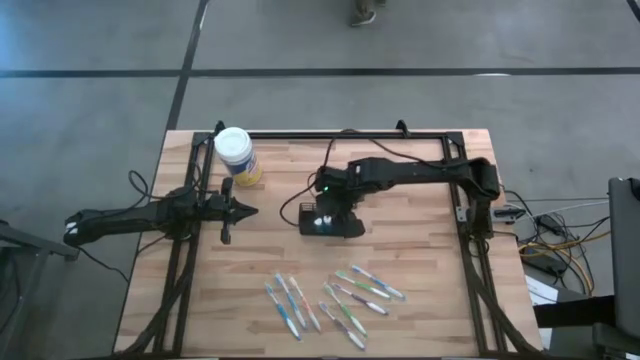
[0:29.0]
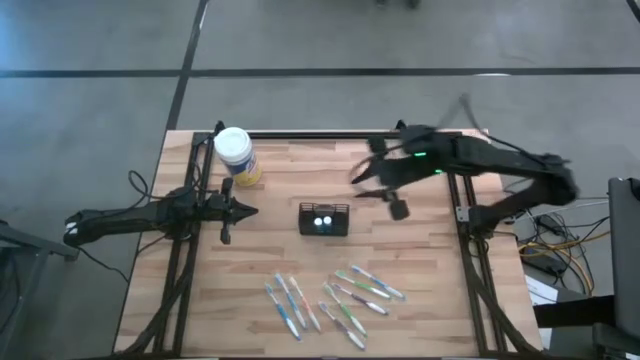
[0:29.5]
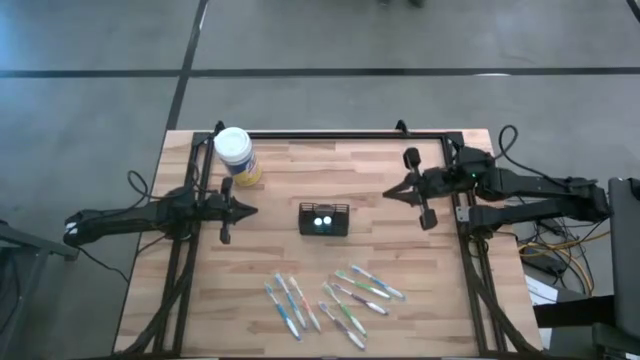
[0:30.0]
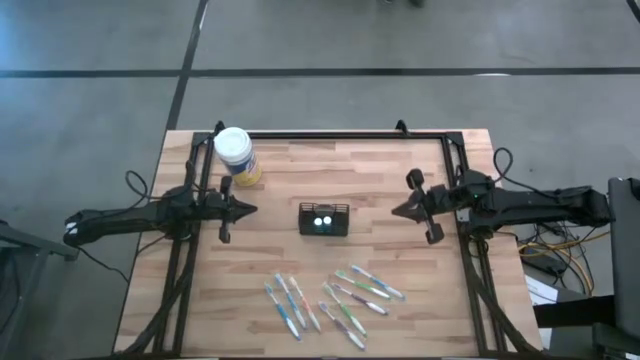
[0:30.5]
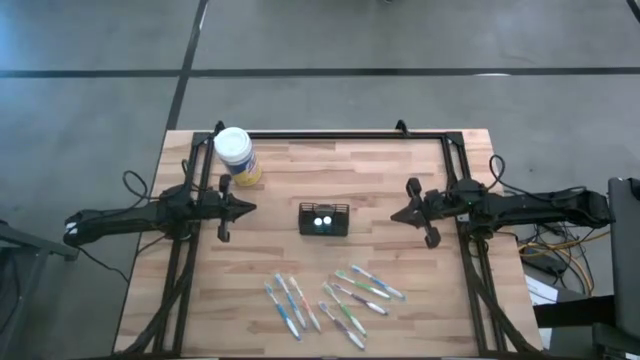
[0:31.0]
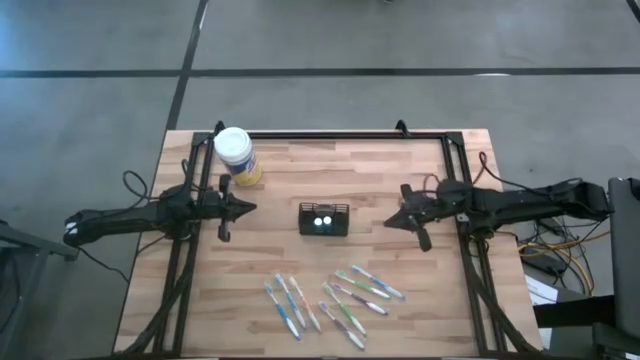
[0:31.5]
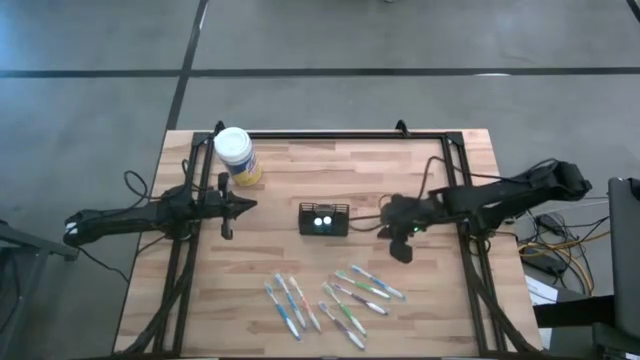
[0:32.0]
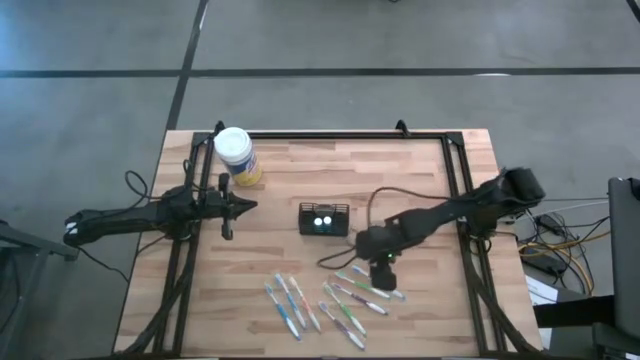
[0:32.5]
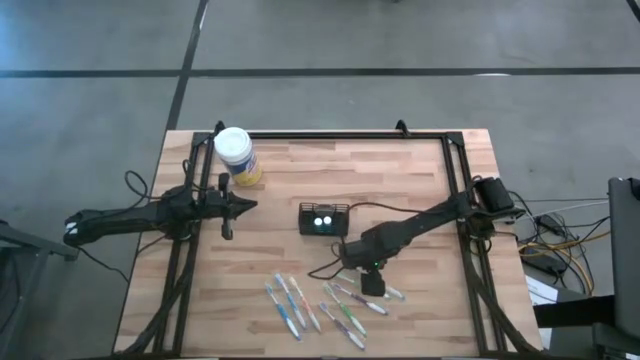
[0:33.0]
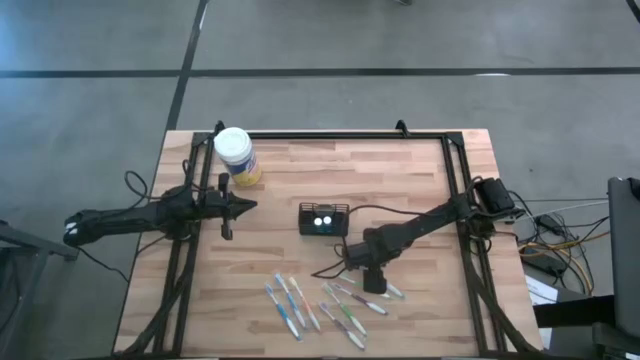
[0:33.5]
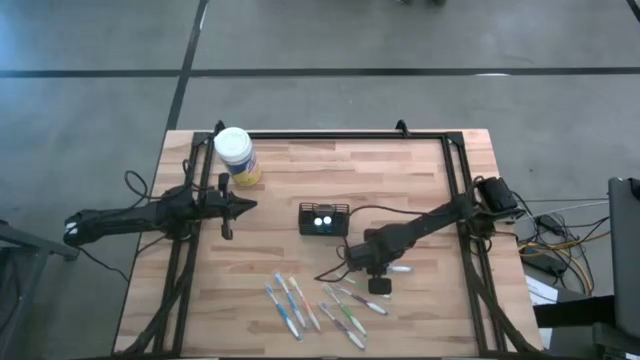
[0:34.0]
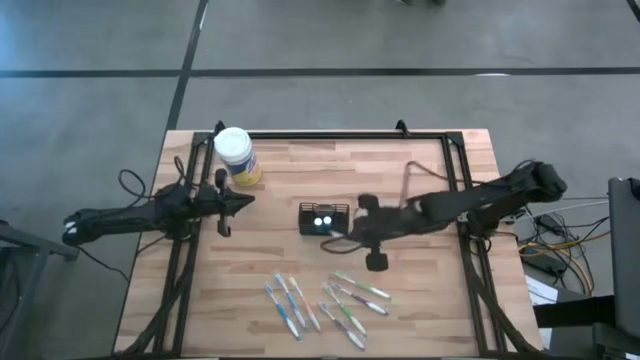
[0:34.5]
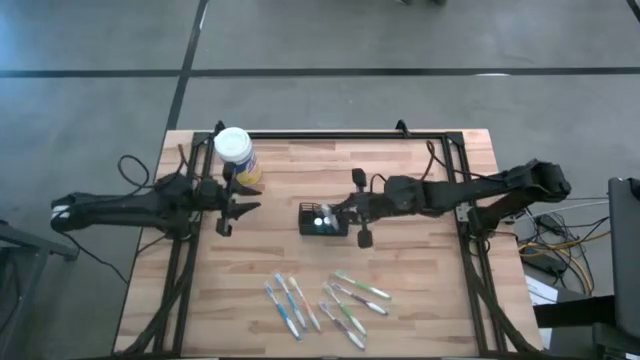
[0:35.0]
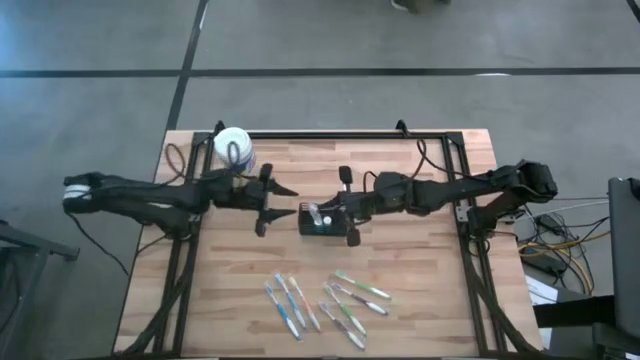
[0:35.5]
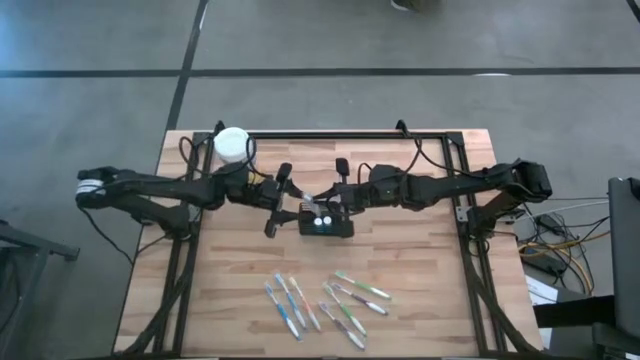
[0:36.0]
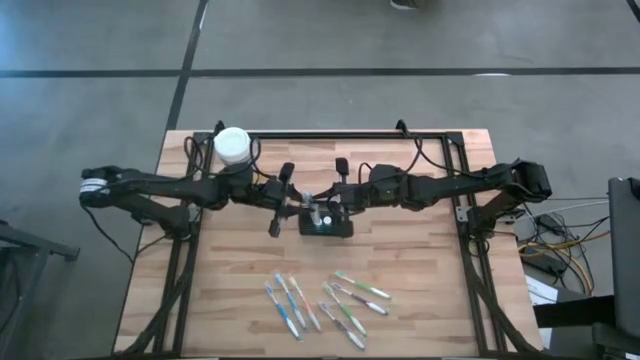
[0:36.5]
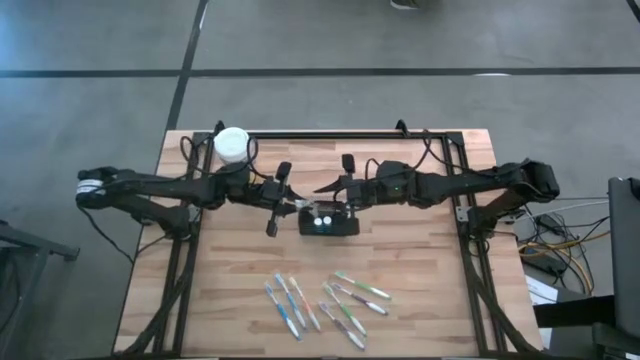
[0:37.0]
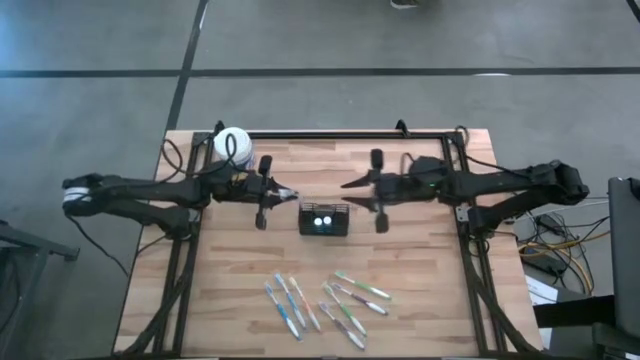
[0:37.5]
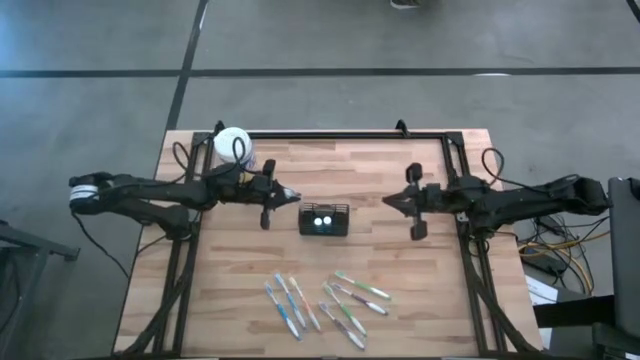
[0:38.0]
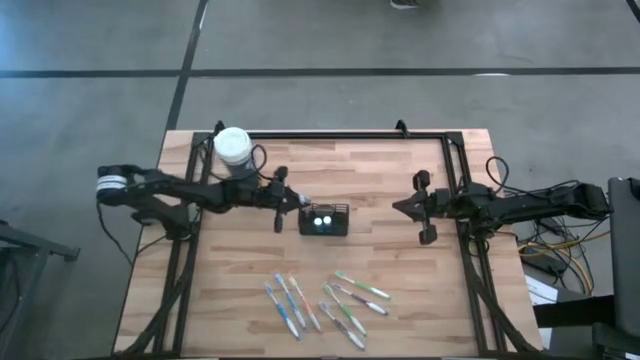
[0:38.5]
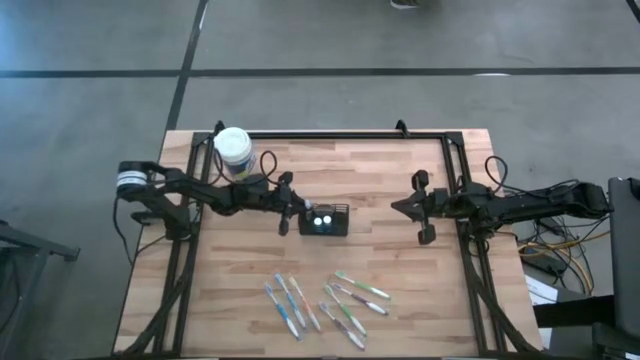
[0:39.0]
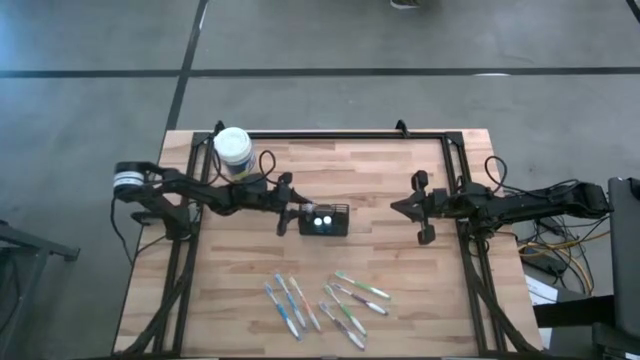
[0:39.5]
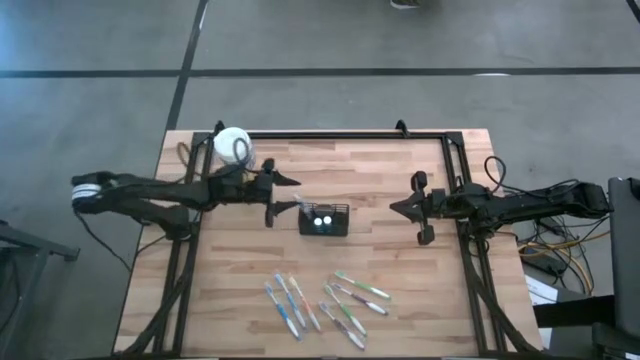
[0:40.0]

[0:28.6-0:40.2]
Task: Pick & Place toothbrushing station
Put the right blue toothbrush into the wire organizer

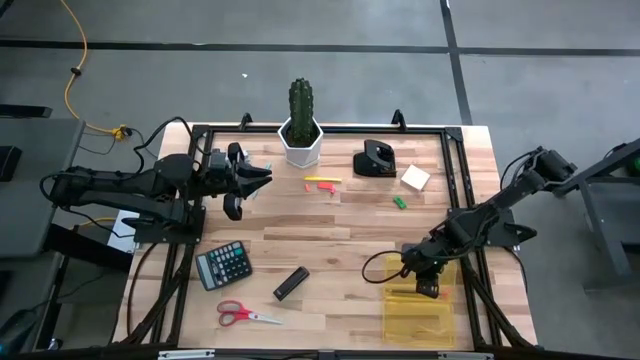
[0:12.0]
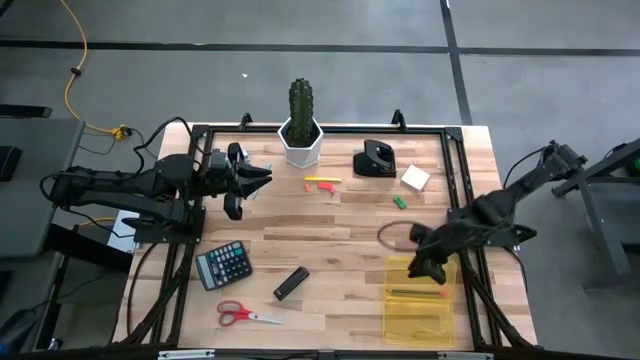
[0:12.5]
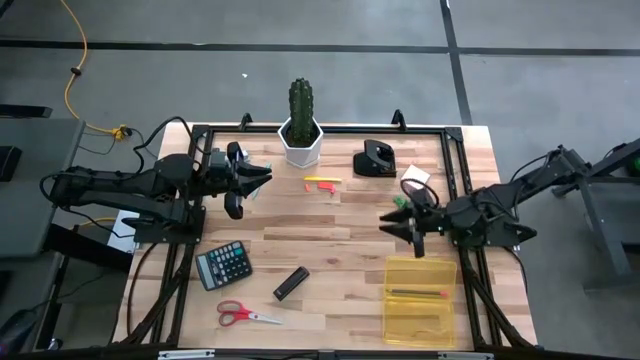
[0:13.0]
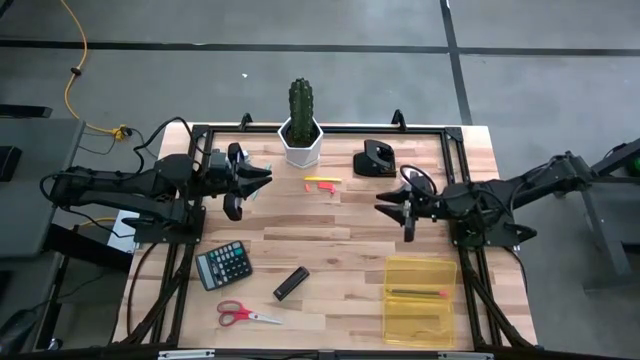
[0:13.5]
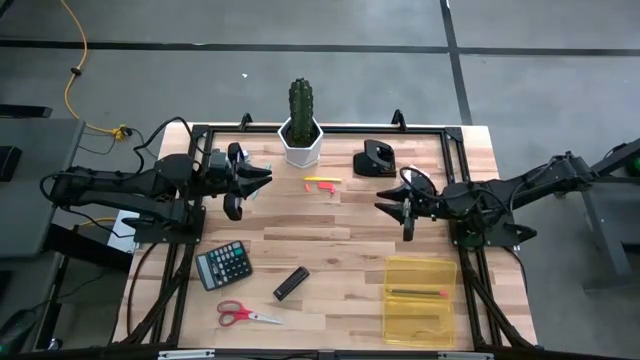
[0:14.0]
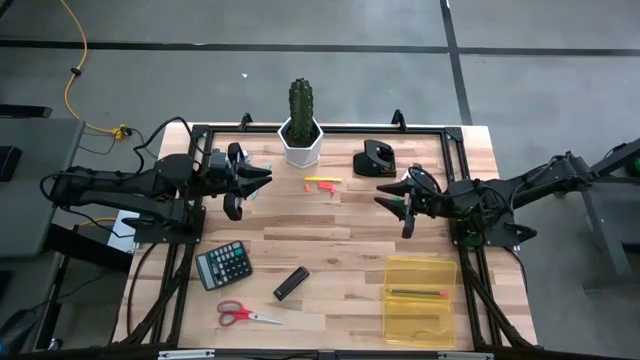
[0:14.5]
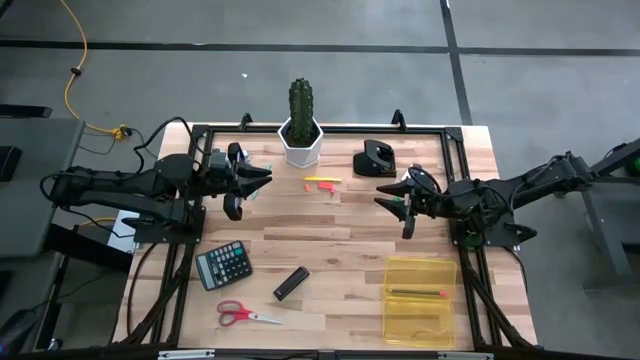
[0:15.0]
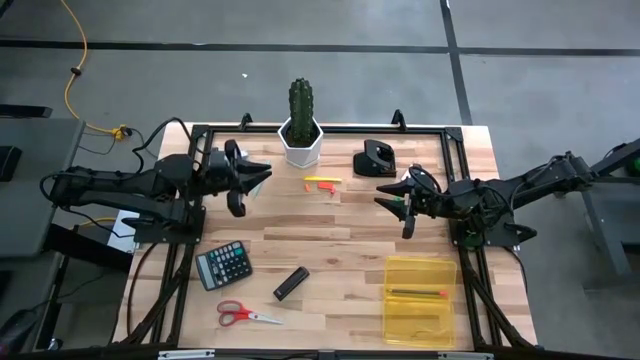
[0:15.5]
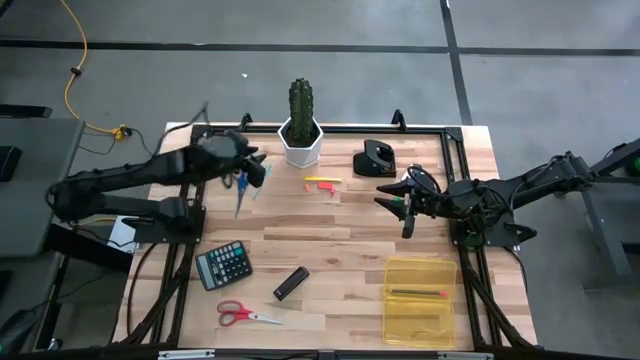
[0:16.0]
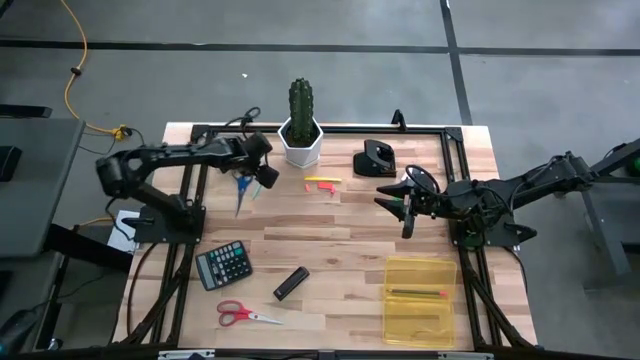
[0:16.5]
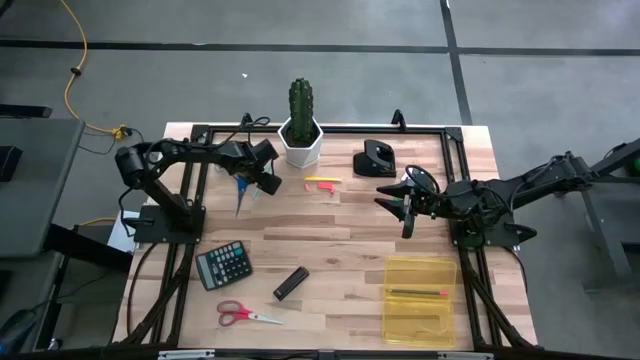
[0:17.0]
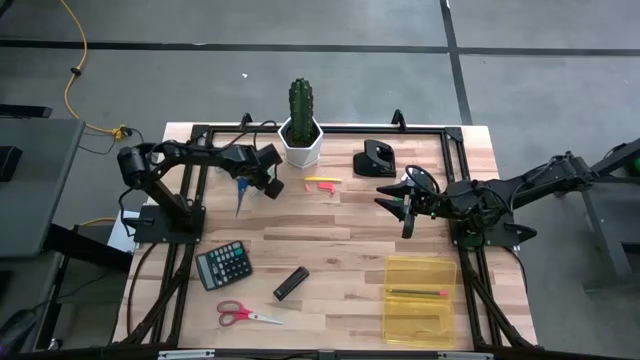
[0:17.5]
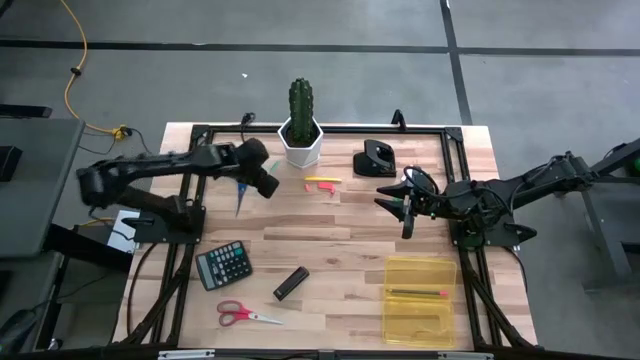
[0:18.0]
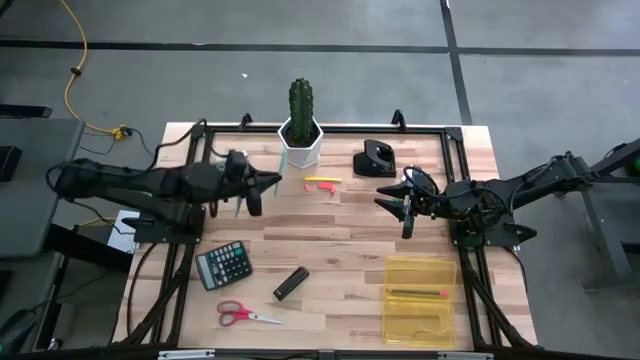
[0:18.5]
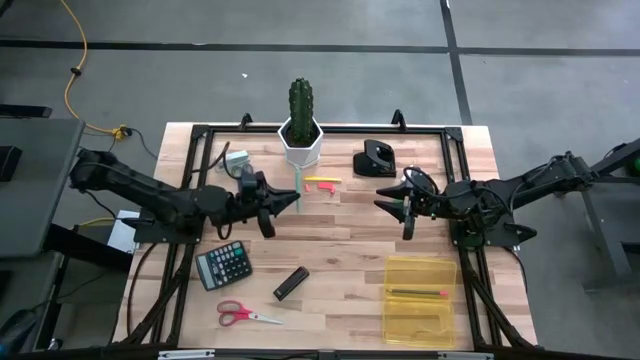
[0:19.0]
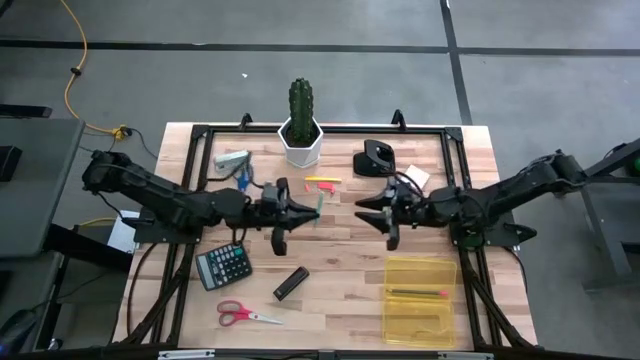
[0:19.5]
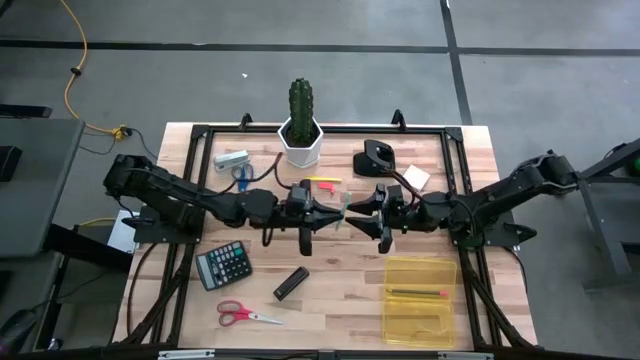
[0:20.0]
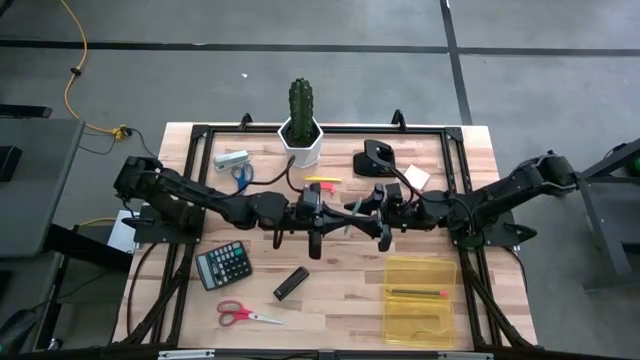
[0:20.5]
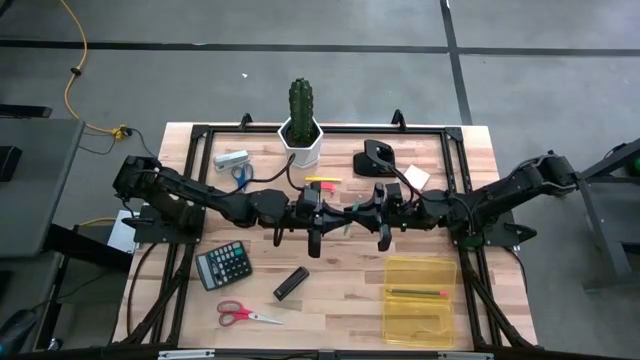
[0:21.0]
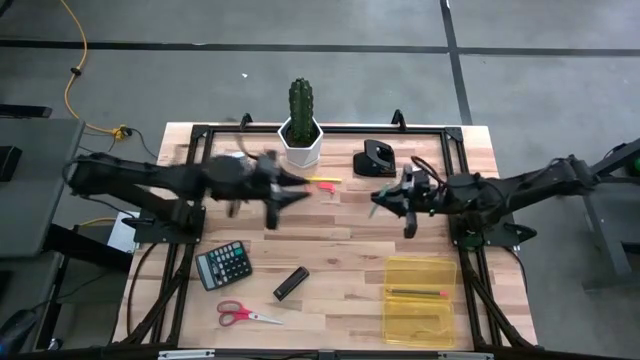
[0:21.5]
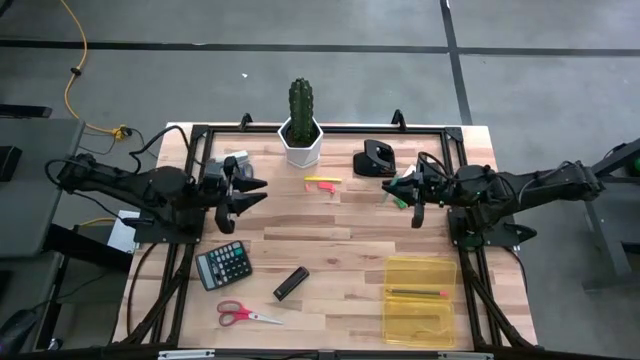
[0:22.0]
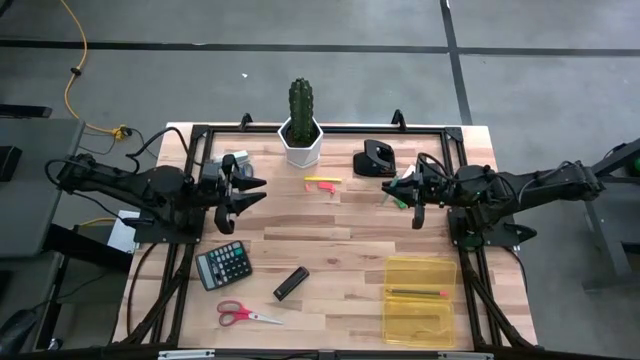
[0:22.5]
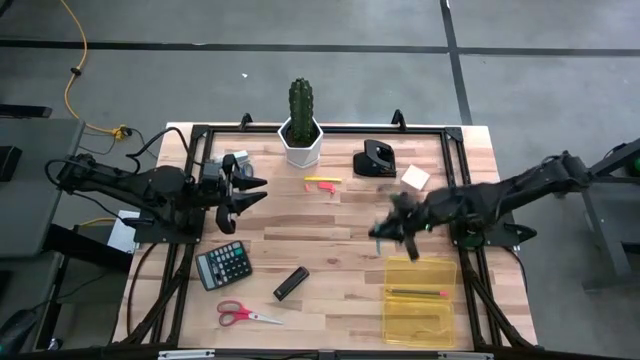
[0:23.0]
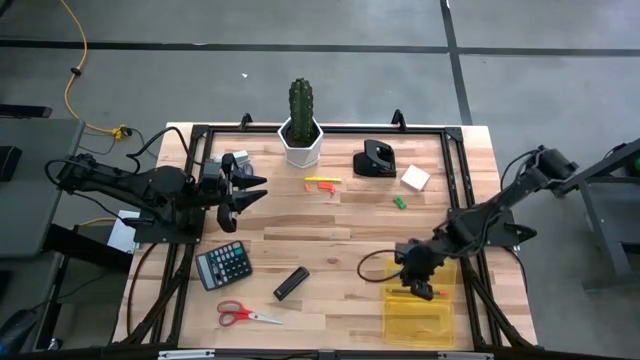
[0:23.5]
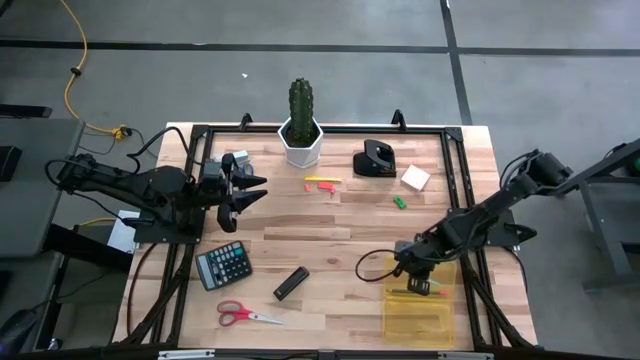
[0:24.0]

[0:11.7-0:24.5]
Task: Pack school essentials
Put the light blue pen on the yellow supply box
